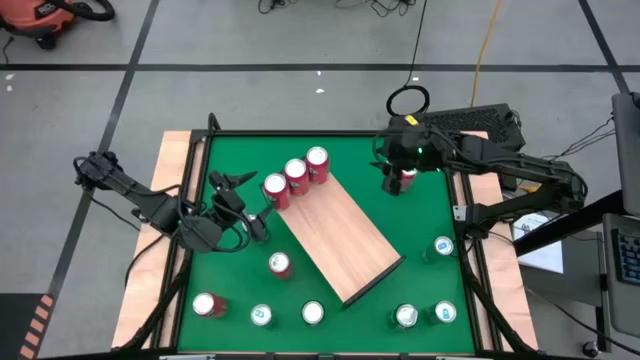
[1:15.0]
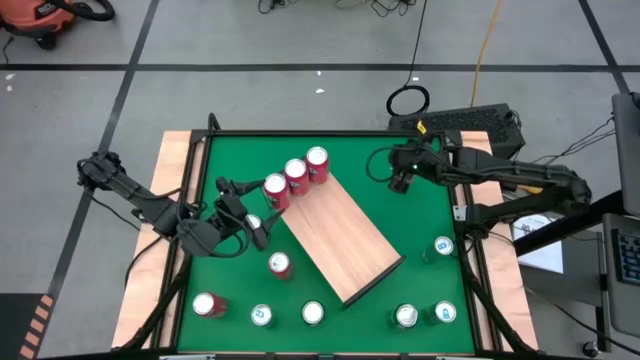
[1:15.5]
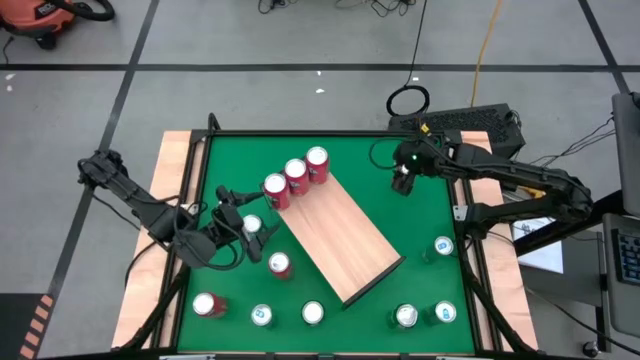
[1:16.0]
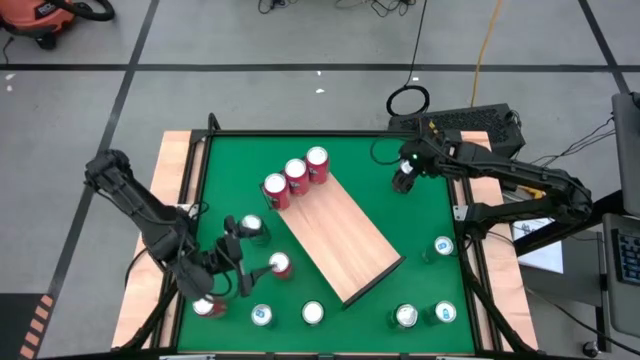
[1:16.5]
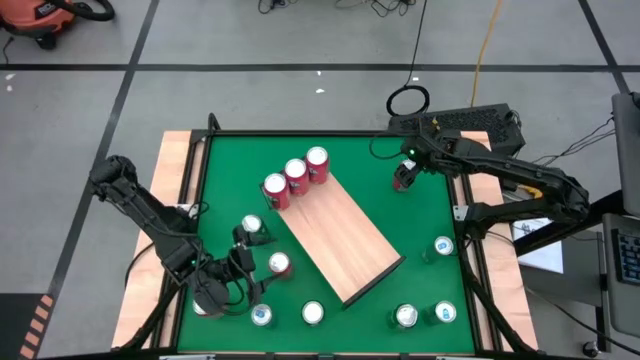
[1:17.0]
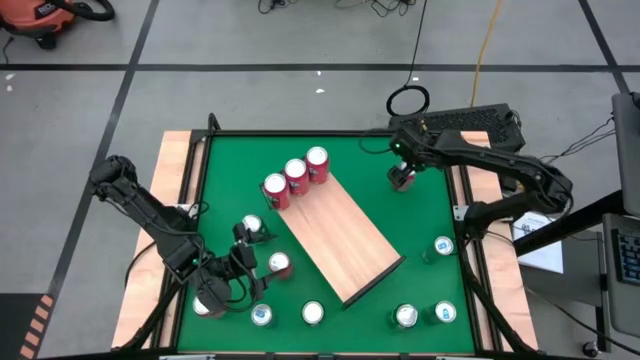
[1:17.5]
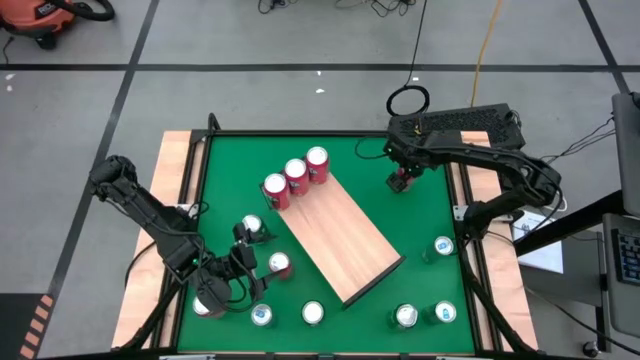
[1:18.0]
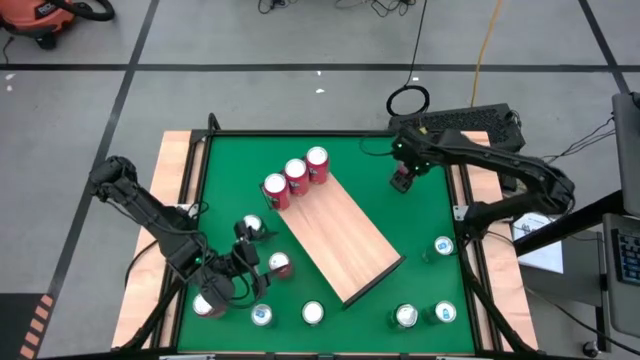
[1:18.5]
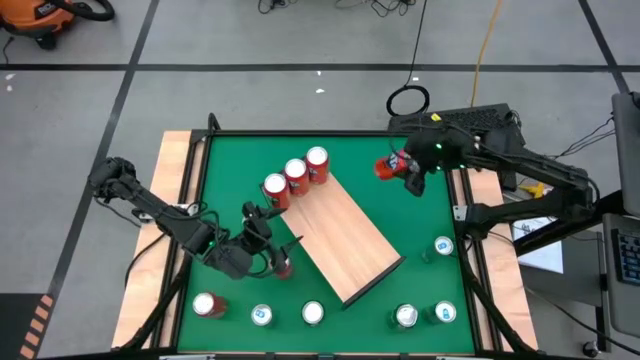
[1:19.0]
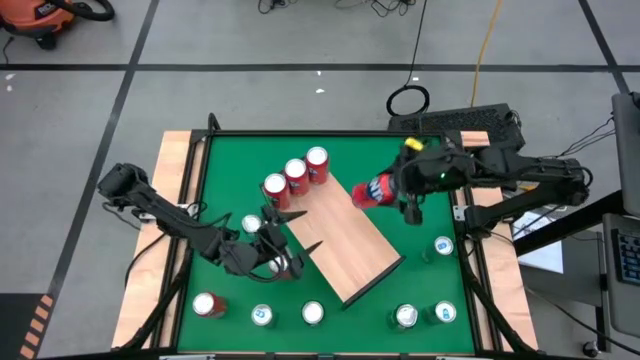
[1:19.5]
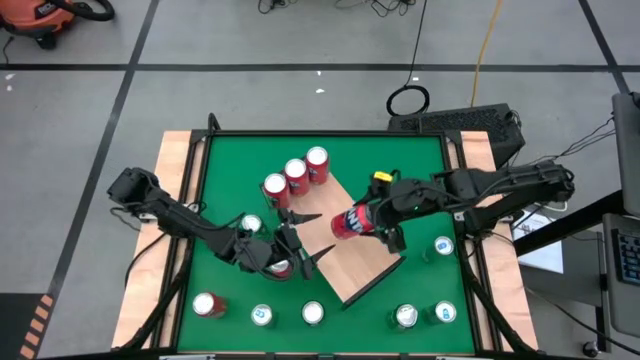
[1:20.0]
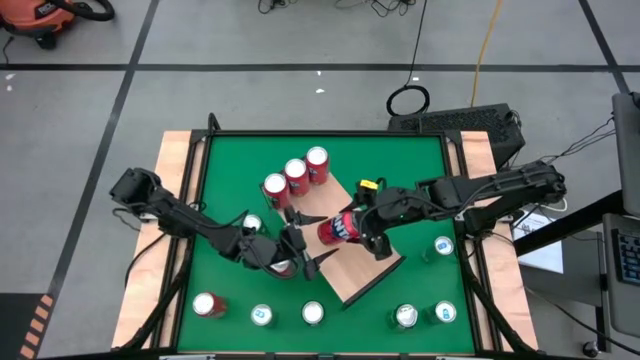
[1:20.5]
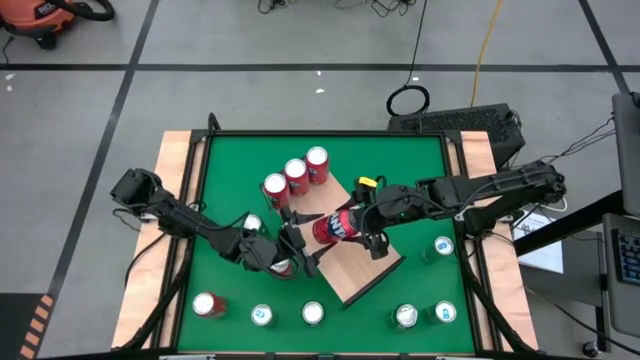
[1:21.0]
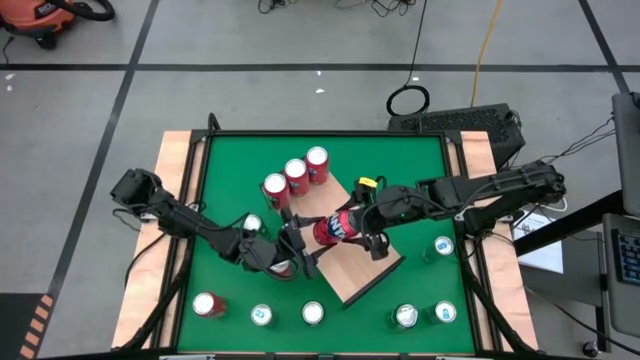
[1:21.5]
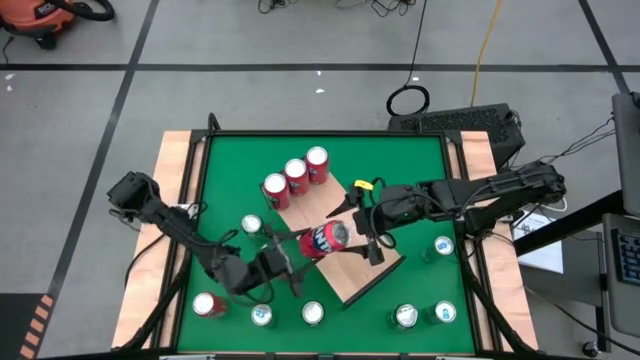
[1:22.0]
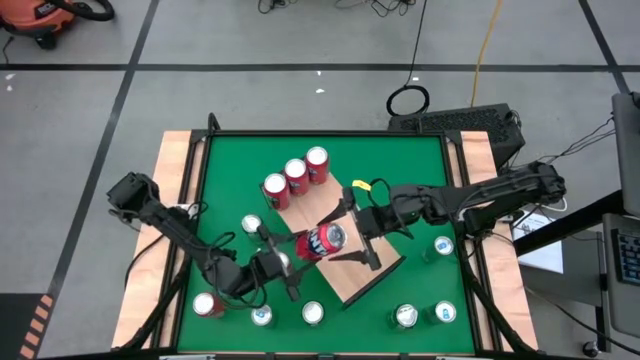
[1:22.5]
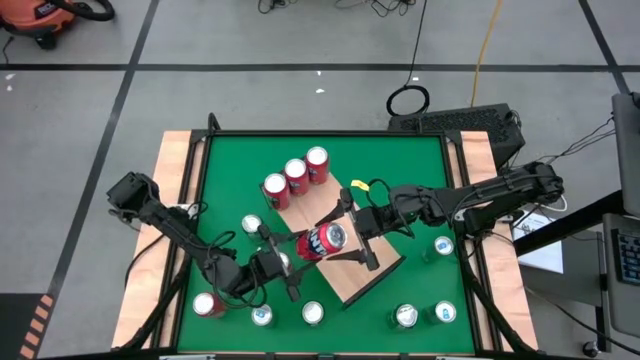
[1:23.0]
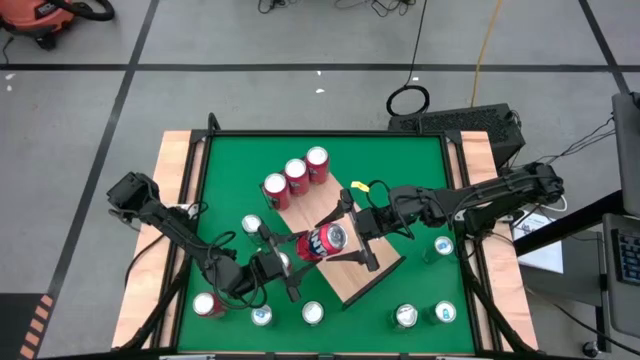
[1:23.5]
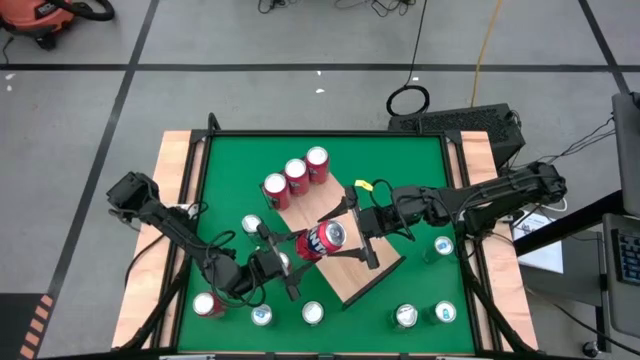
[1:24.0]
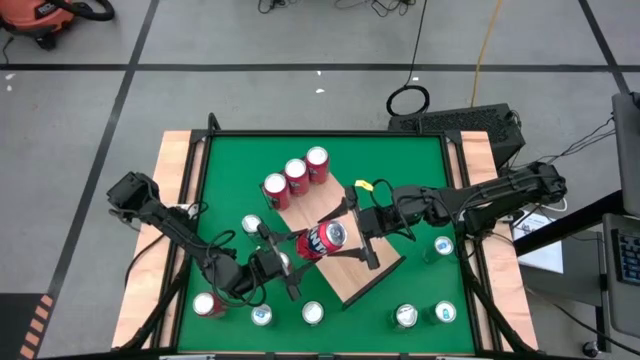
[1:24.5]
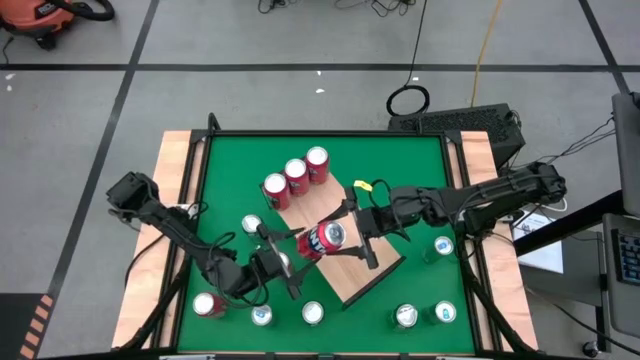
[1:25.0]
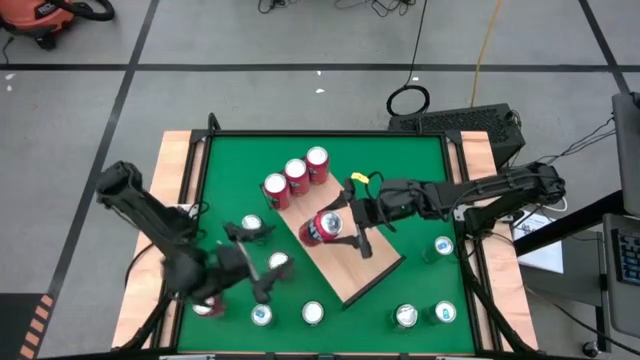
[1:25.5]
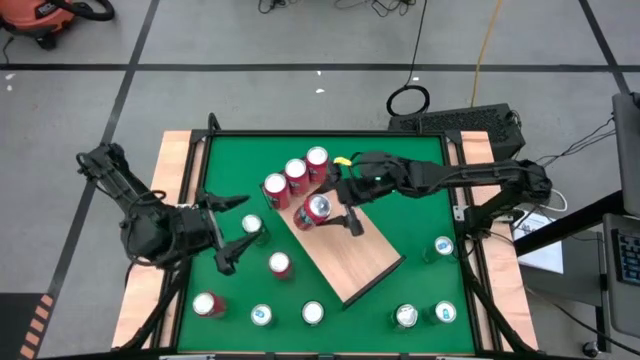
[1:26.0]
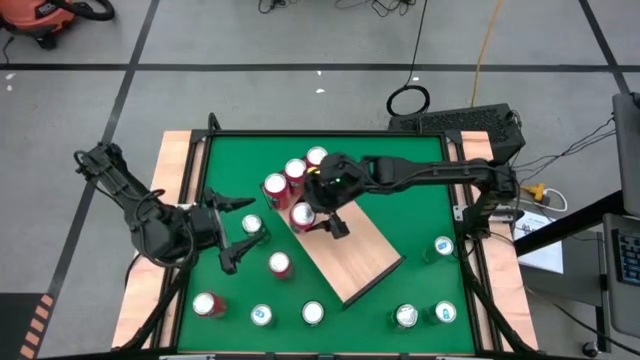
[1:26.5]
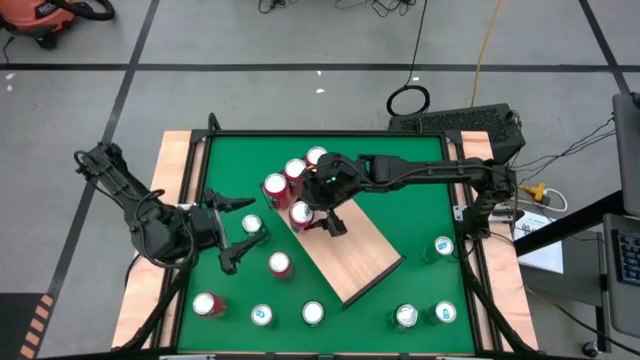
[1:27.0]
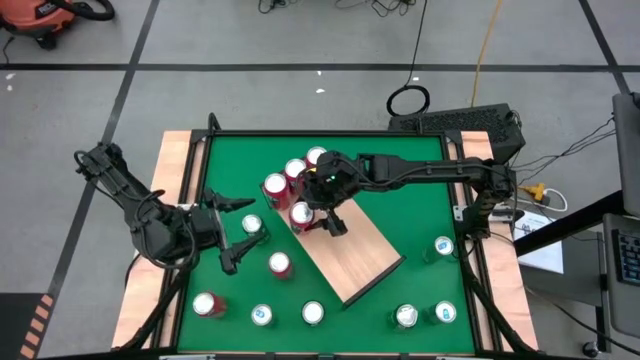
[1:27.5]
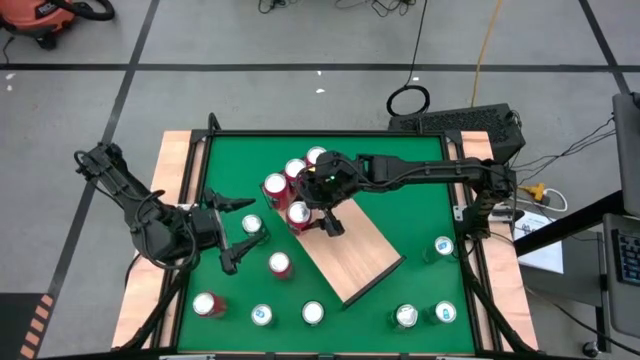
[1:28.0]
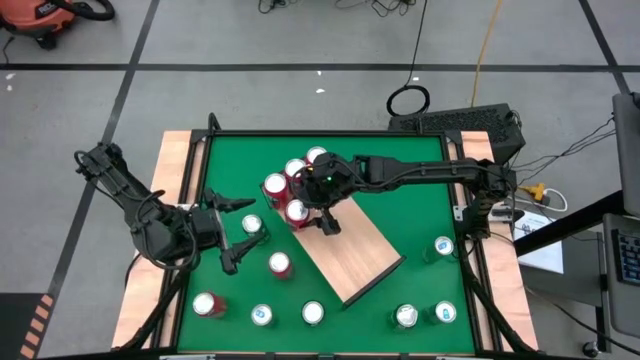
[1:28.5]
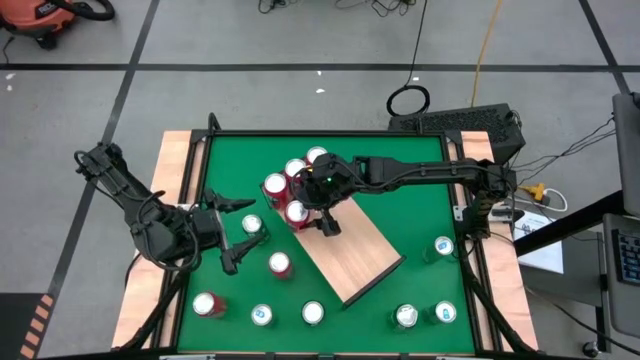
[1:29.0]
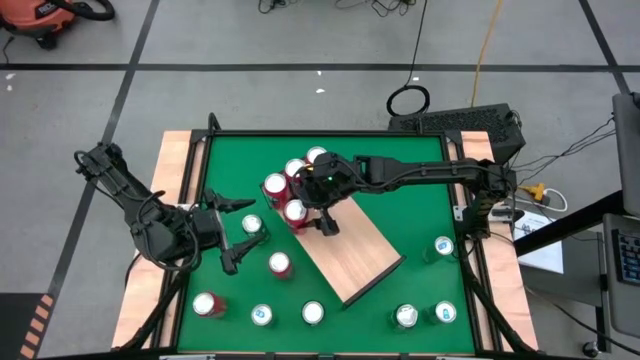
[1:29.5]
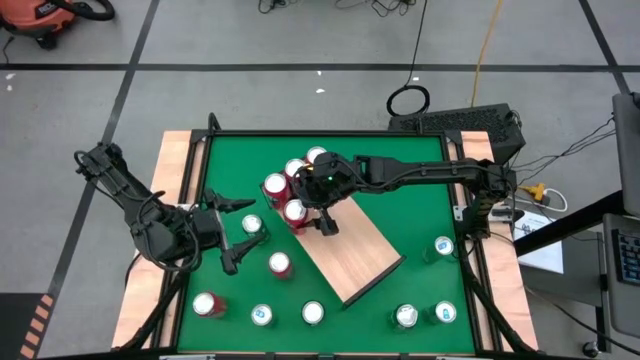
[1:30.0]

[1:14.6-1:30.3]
Task: Place canned beverage on shelf
Put the red soda can on the shelf

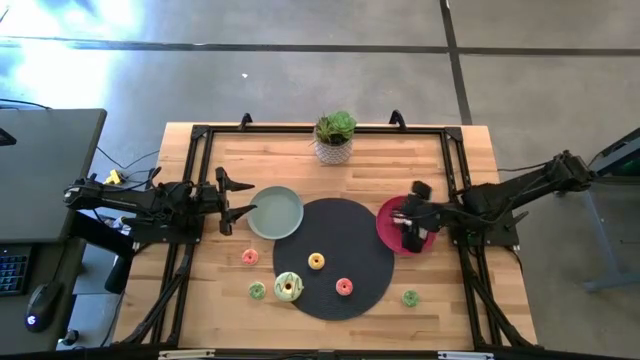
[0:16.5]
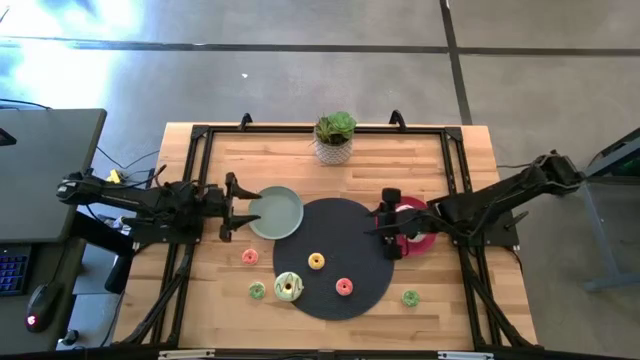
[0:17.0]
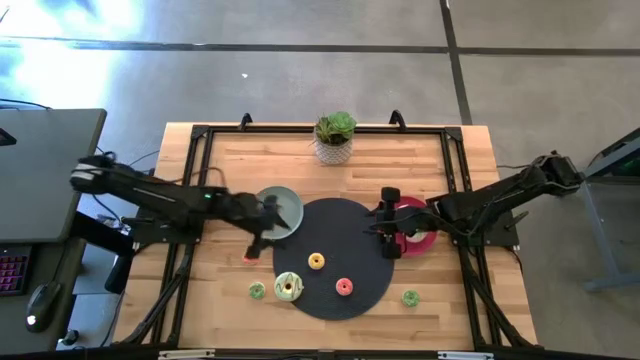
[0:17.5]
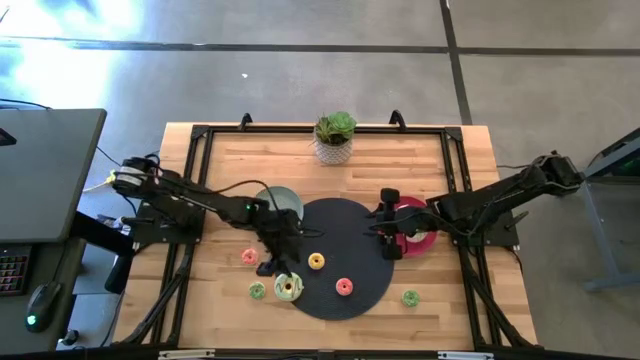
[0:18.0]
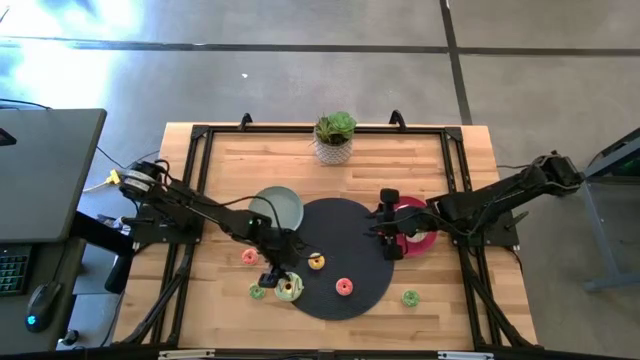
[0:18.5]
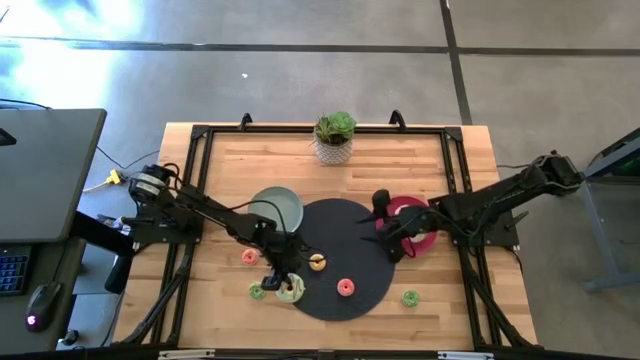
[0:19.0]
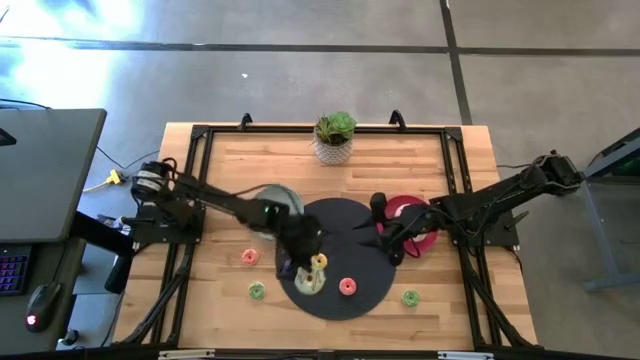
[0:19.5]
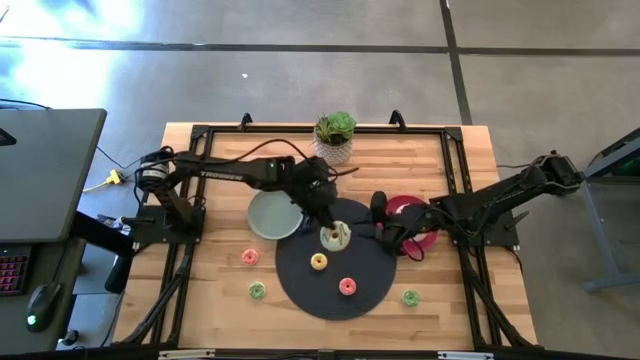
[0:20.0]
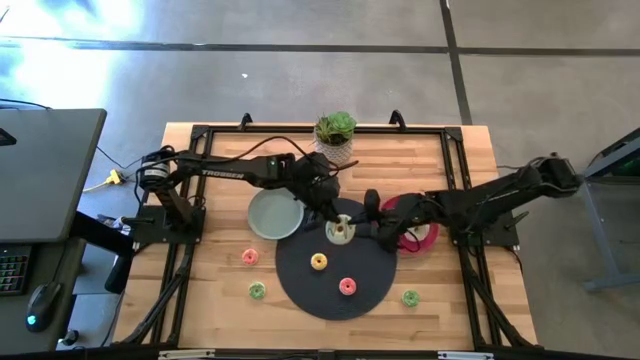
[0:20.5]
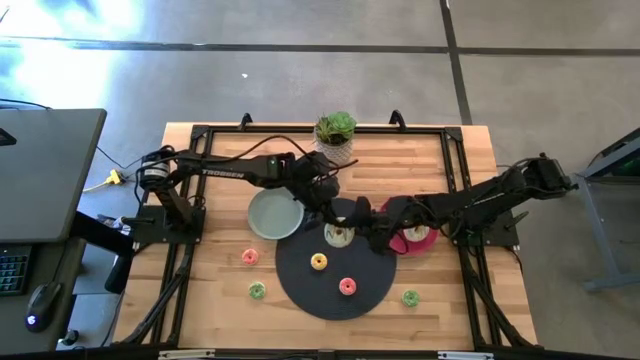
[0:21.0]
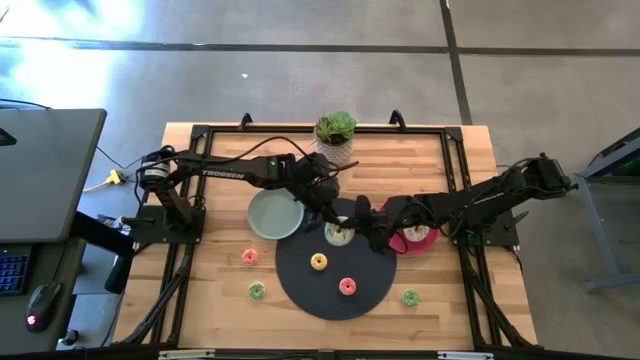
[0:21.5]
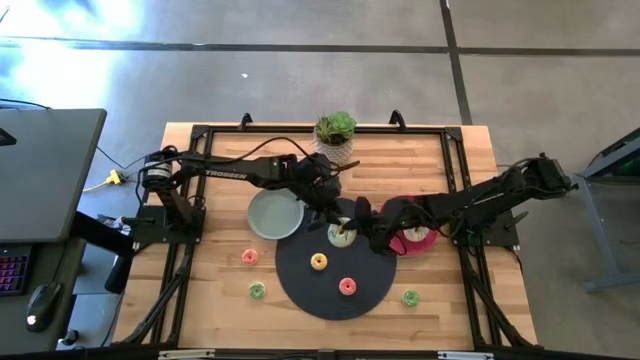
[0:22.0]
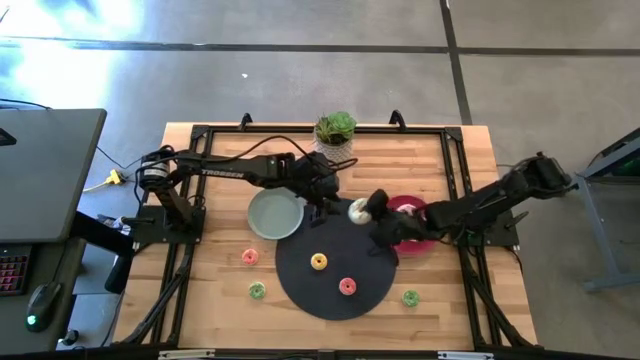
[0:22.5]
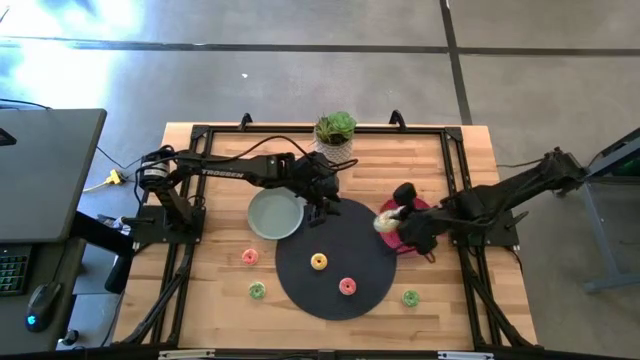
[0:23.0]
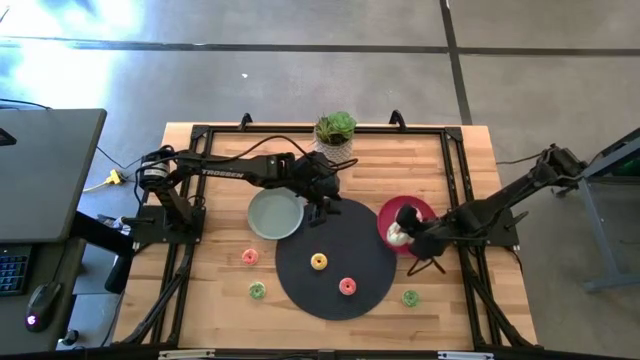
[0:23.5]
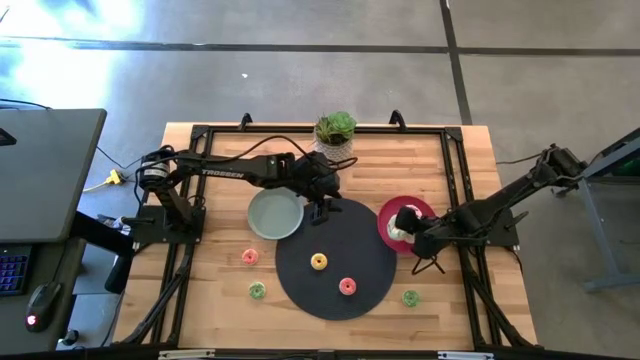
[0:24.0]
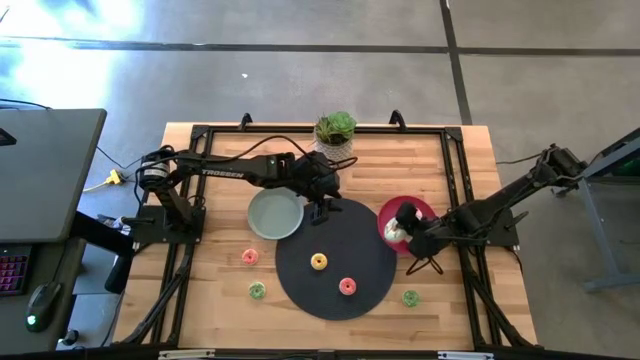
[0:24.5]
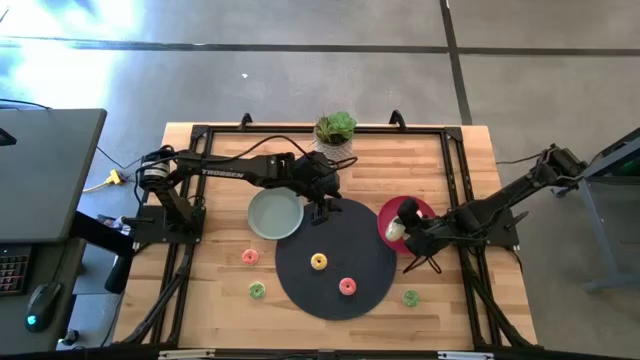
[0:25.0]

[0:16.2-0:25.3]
Task: Pick & Place donuts
Put the large blue donut on the red plate
